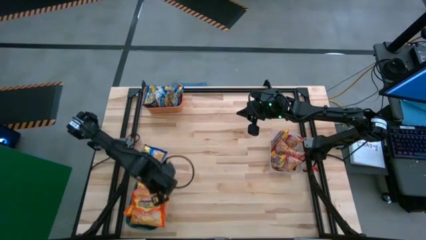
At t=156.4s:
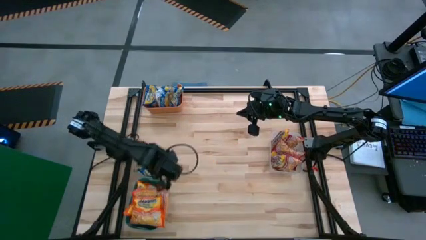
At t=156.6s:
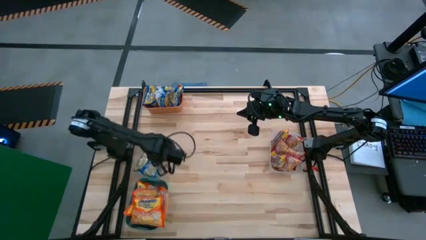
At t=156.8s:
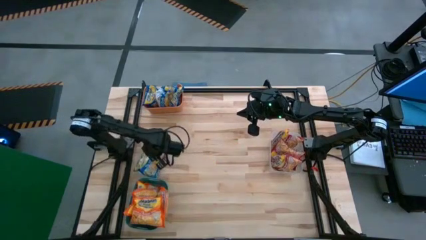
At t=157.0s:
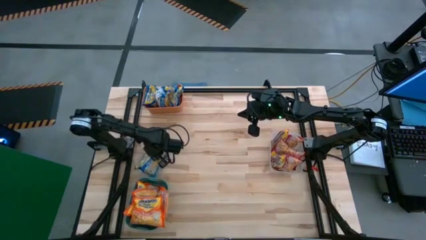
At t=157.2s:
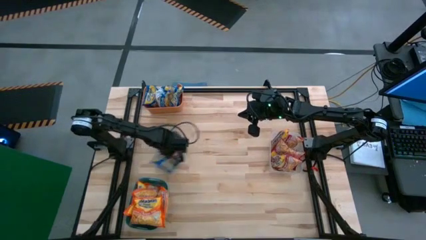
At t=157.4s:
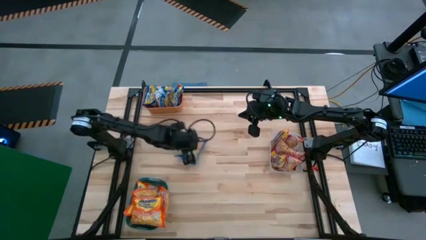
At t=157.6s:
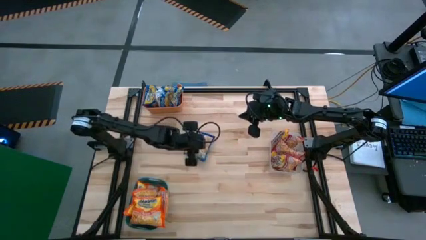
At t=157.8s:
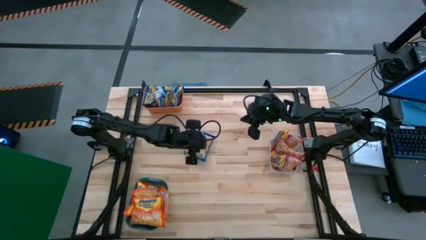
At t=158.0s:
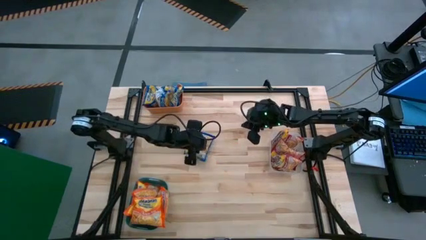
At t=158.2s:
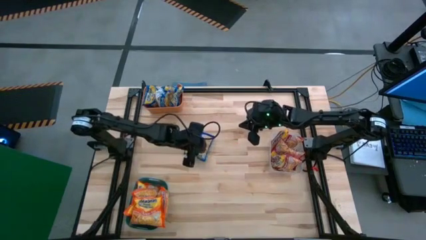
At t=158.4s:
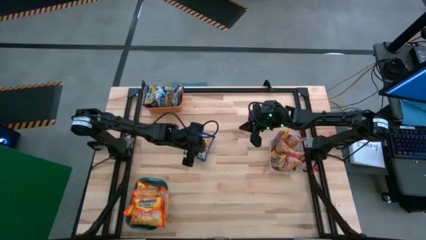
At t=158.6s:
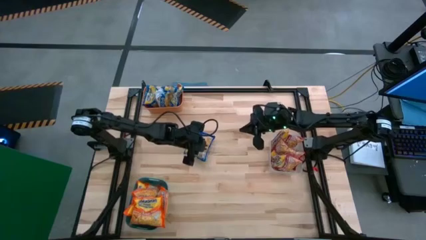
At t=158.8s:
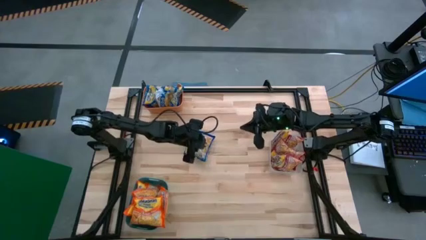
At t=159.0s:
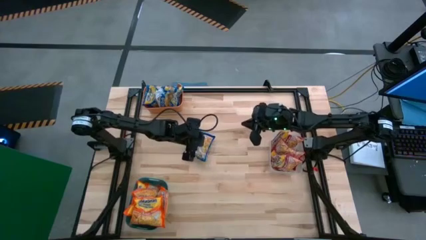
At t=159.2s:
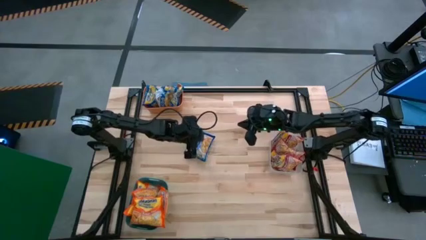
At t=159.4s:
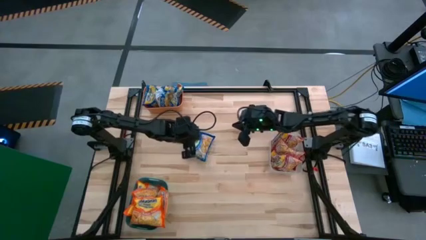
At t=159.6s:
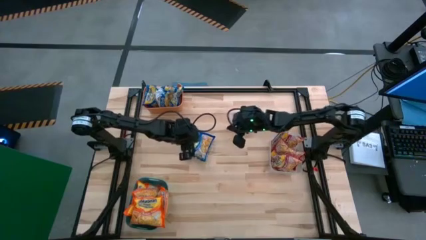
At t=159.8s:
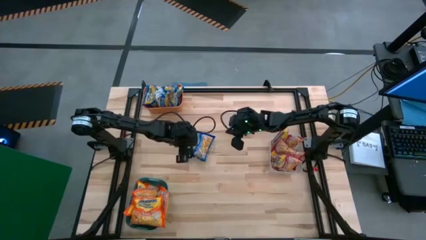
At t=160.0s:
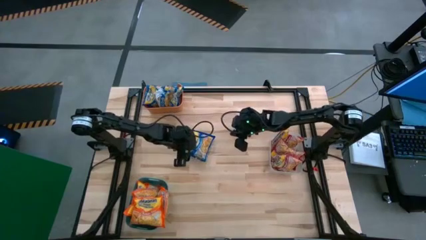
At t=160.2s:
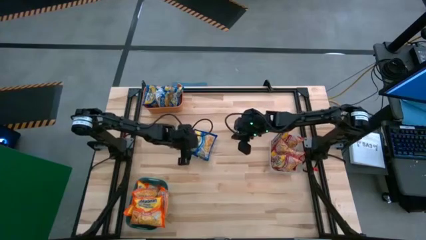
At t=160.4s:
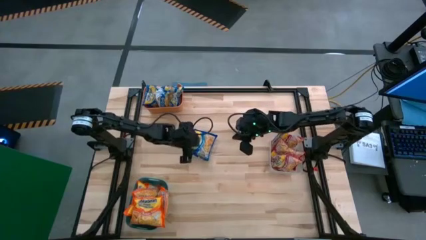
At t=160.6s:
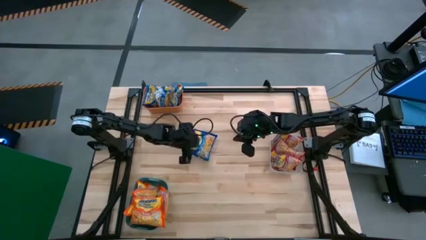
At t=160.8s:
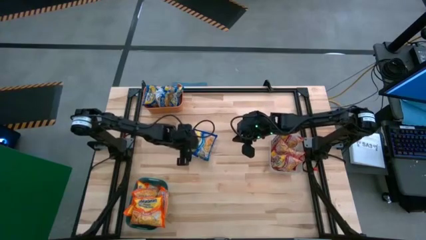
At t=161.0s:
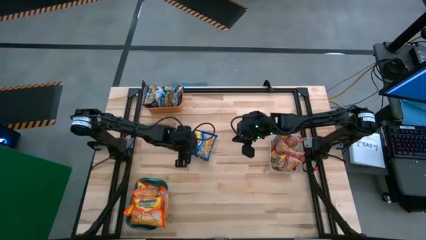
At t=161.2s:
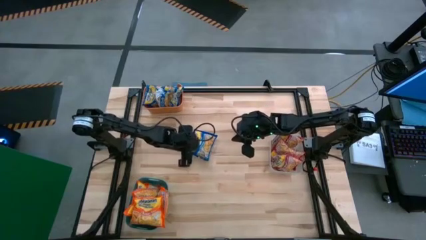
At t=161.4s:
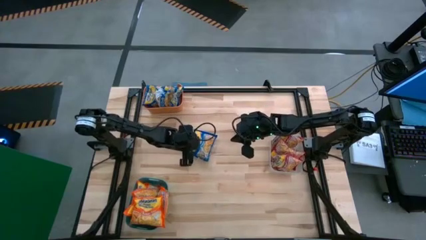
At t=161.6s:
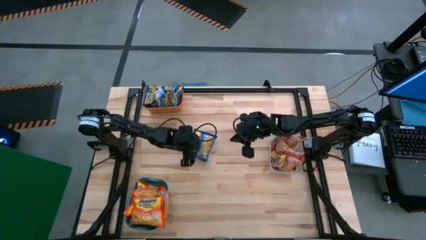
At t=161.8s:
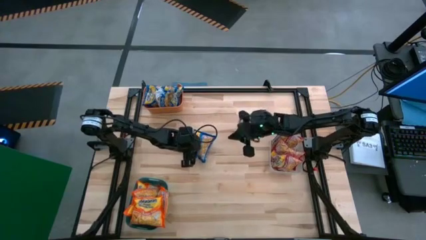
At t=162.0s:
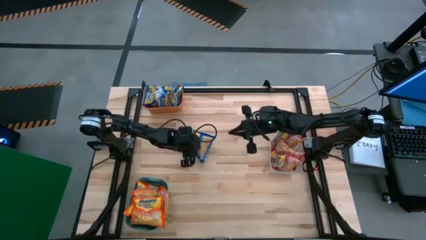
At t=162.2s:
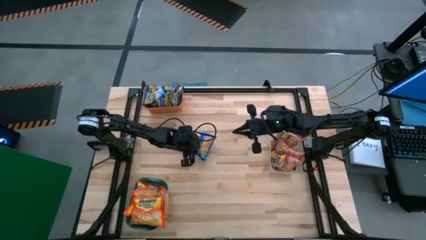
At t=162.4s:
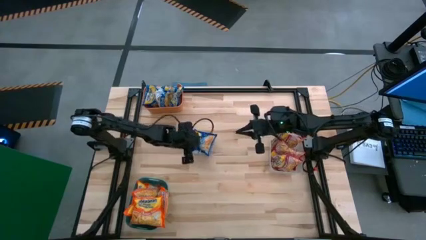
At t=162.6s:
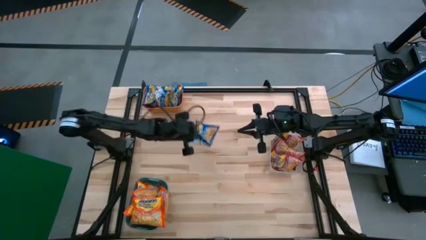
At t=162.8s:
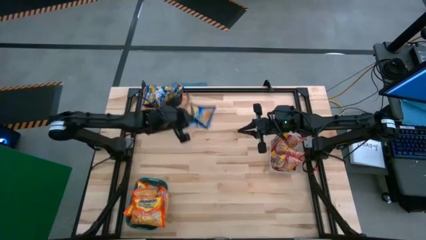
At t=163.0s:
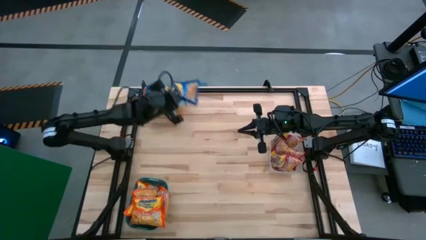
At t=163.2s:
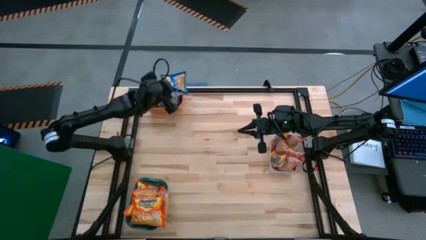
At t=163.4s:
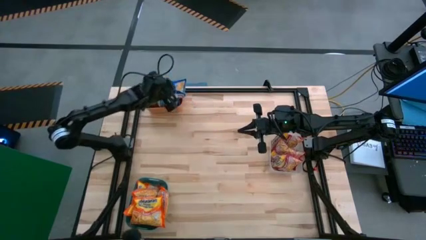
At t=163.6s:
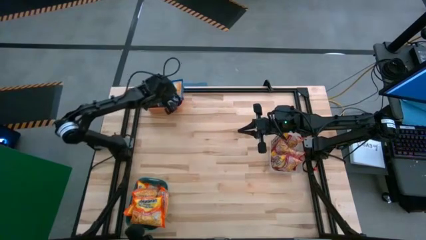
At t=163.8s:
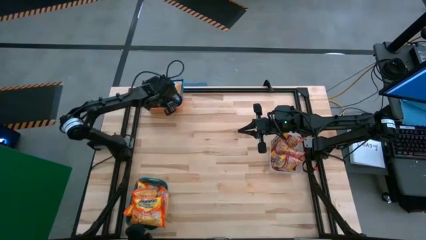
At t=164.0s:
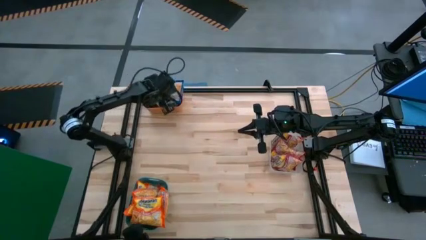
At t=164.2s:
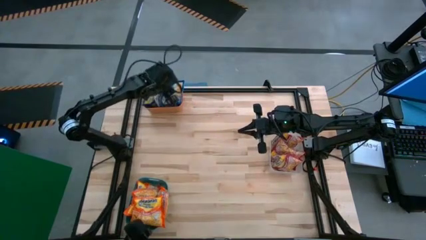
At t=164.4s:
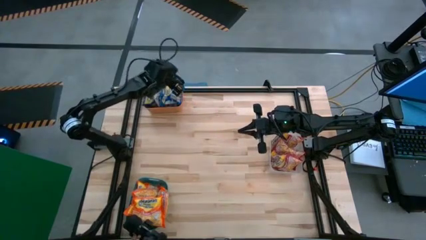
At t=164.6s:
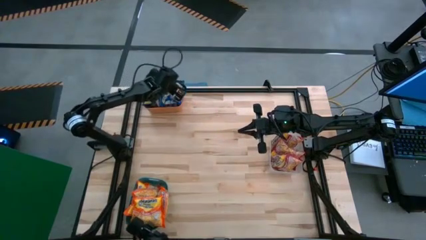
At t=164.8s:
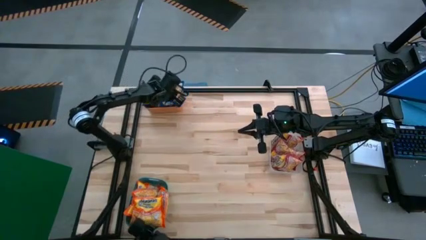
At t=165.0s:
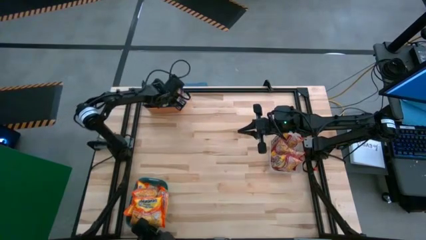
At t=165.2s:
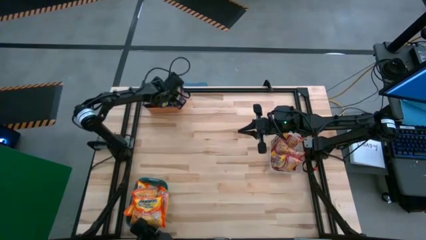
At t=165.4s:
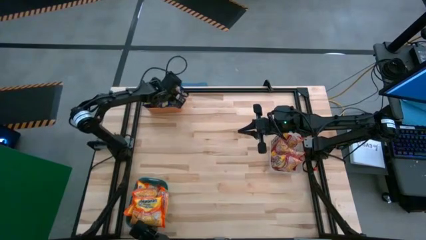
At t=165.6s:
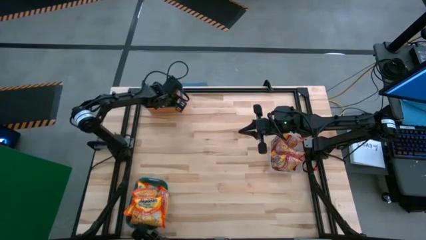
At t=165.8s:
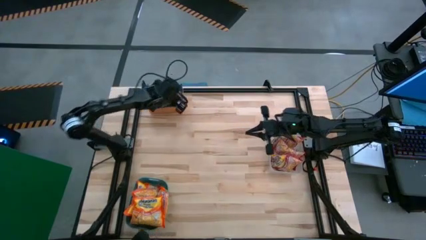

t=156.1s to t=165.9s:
Task: Sort Maruchan noodles
Put the blue noodle pack into the orange bin

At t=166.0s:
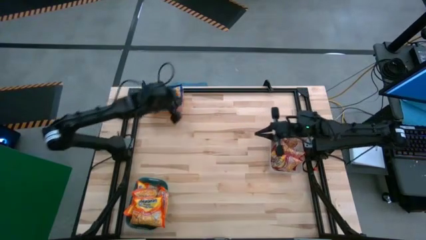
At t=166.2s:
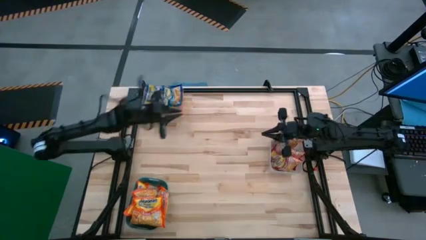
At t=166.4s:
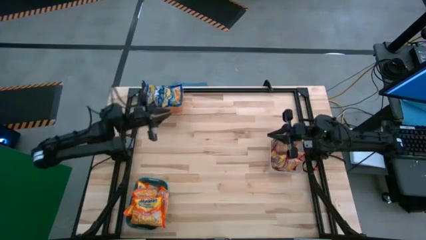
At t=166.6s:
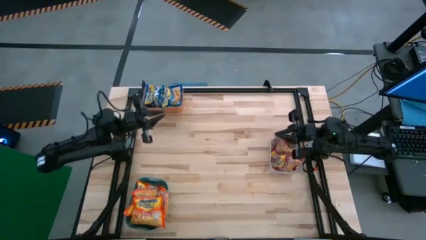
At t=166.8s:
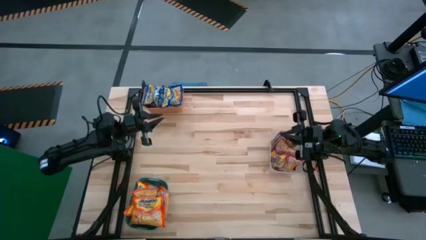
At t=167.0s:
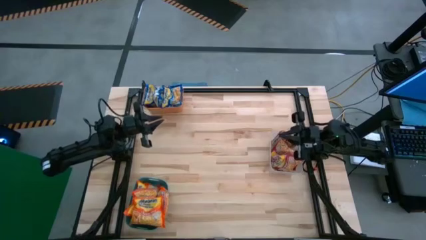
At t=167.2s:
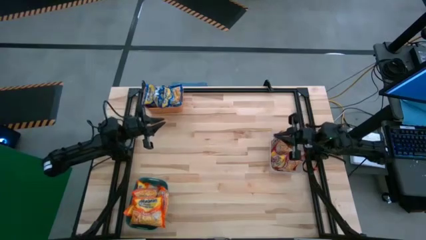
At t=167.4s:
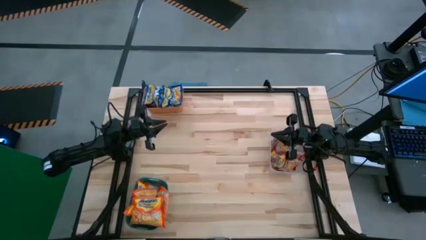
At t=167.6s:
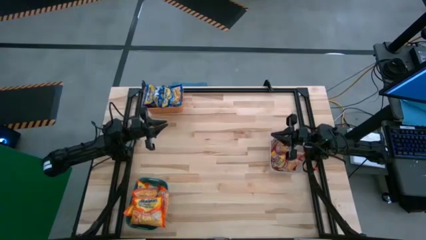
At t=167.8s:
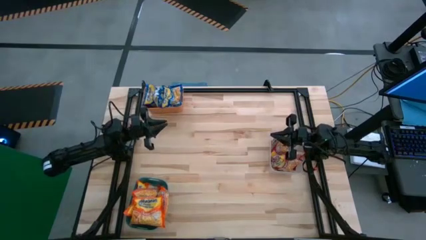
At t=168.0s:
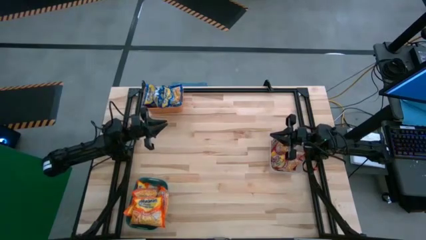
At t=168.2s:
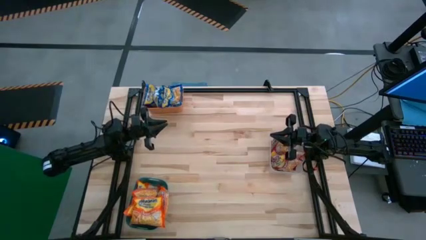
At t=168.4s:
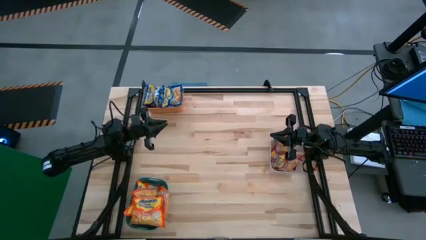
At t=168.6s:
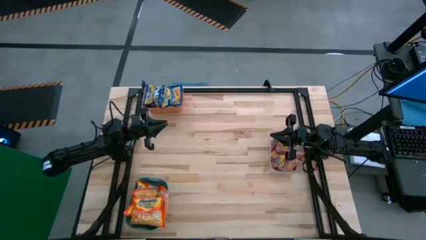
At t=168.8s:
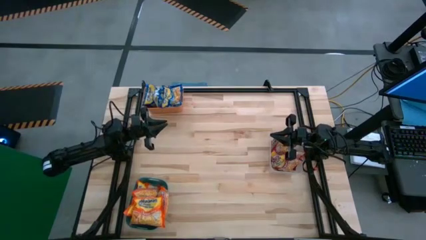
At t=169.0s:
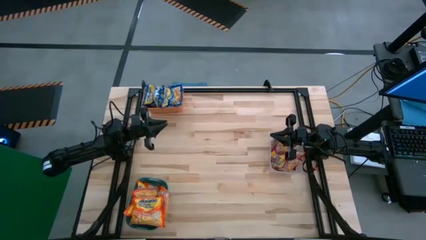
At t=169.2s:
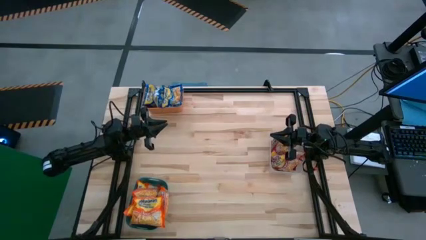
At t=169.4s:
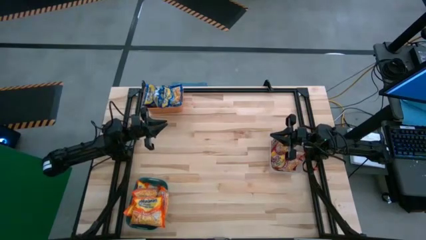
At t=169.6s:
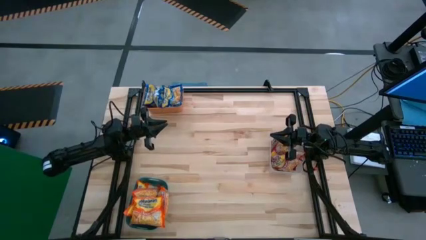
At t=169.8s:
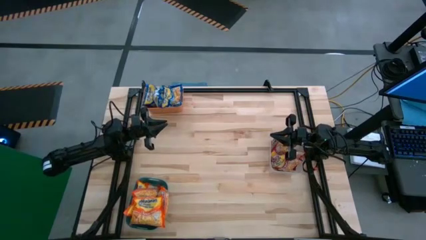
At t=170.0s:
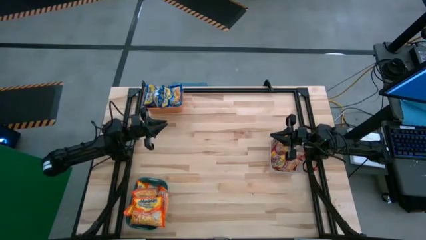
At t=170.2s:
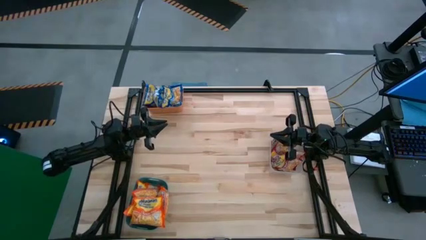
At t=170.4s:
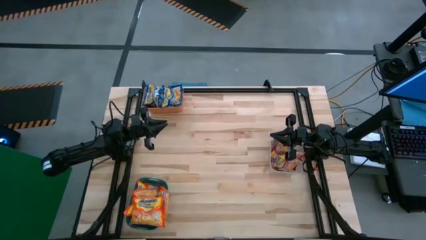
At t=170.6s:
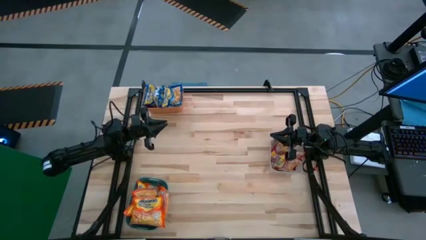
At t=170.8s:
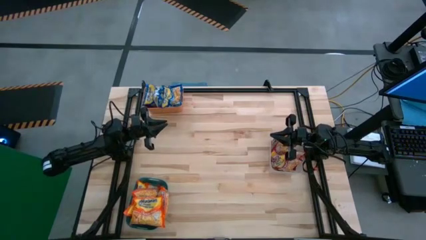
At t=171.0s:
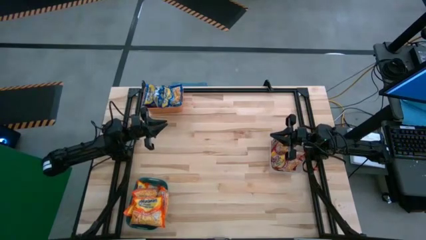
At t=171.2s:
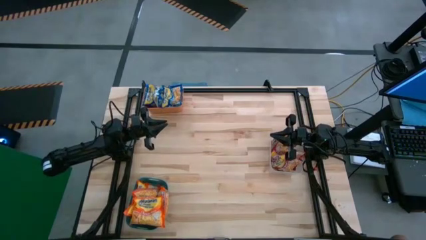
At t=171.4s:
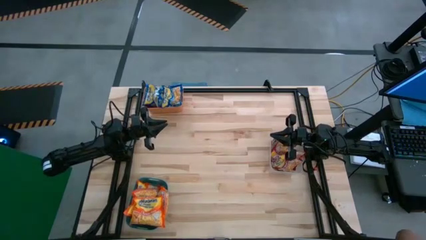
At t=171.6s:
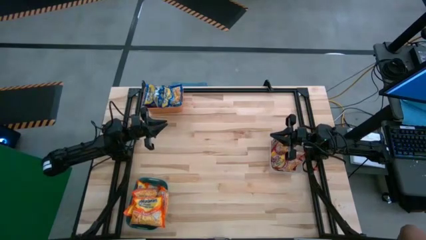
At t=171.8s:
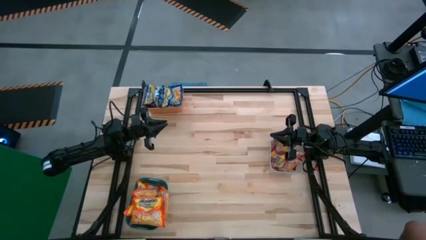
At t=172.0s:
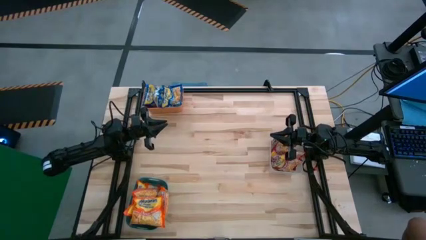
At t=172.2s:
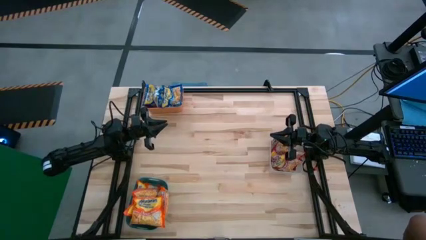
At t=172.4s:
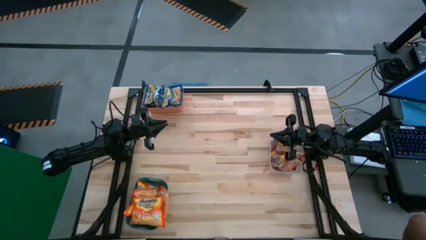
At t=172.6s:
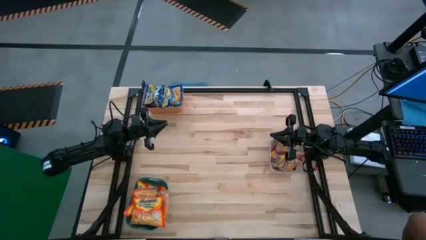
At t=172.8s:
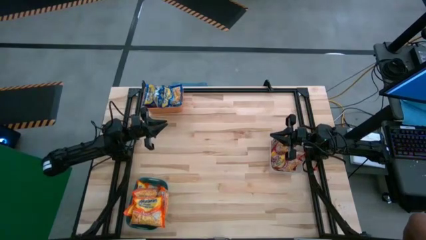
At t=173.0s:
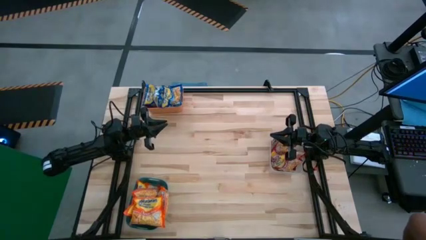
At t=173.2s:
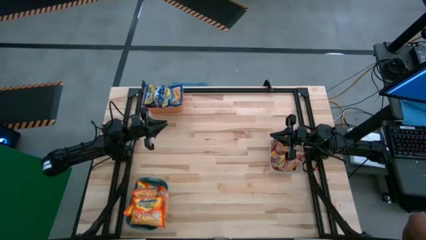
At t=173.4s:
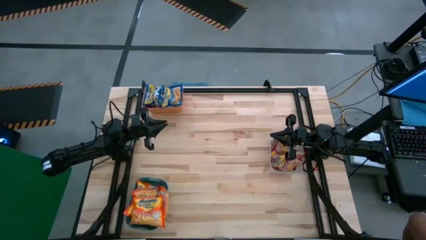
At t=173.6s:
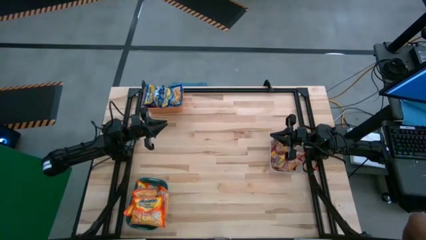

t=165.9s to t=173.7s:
Return to Home Position
